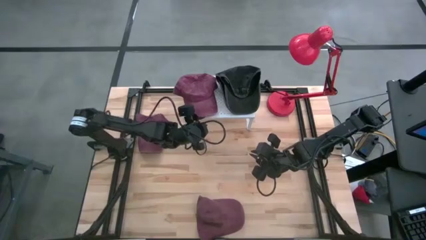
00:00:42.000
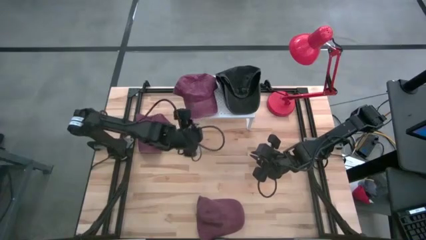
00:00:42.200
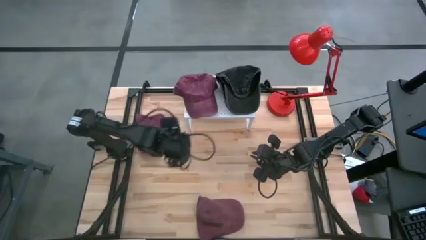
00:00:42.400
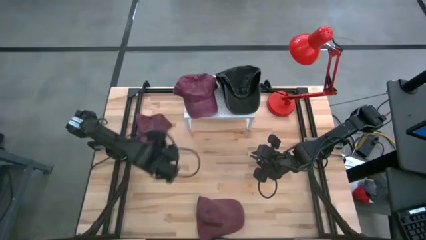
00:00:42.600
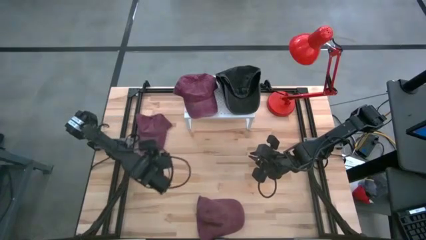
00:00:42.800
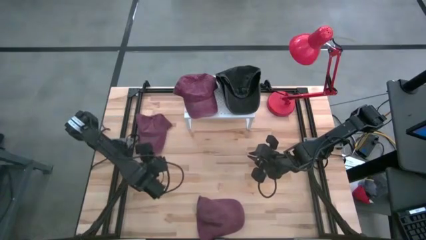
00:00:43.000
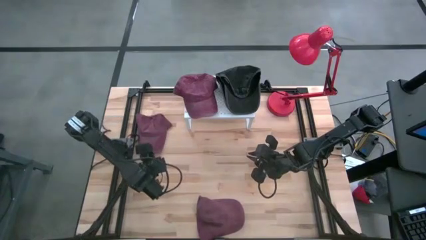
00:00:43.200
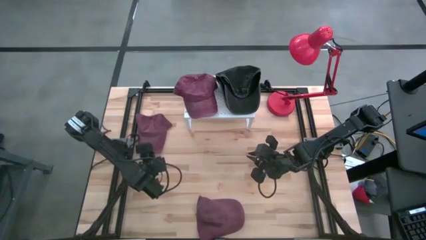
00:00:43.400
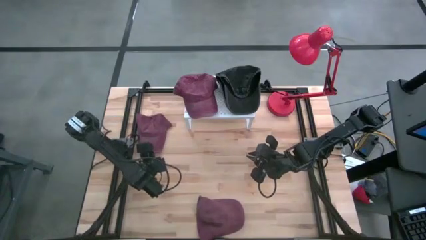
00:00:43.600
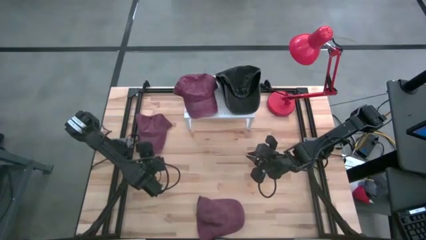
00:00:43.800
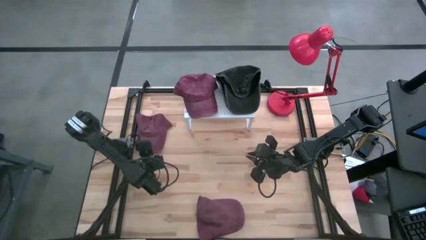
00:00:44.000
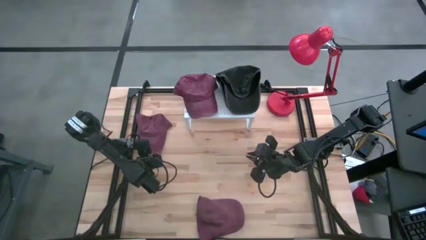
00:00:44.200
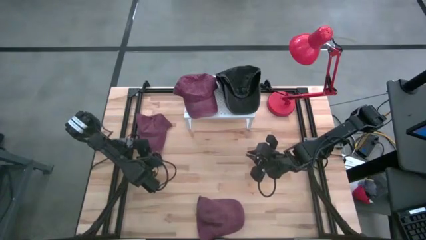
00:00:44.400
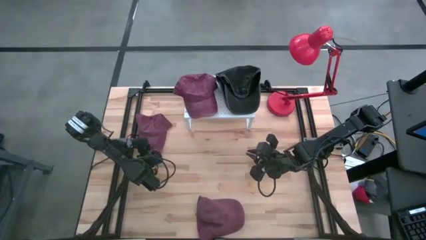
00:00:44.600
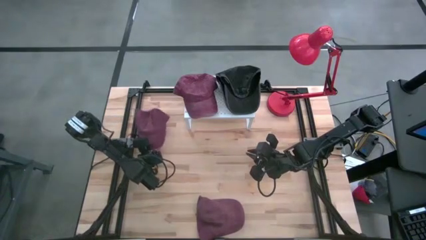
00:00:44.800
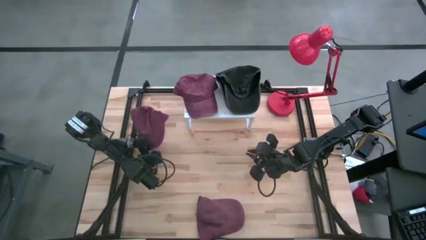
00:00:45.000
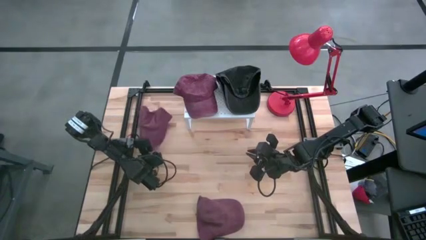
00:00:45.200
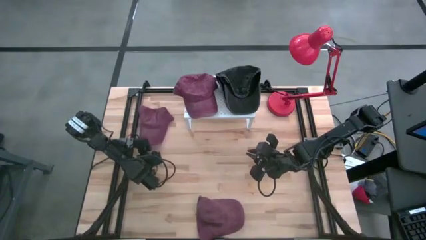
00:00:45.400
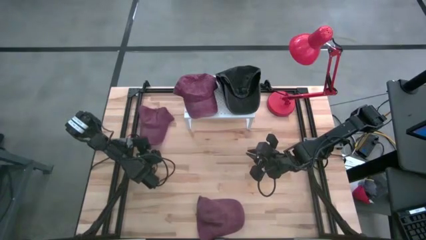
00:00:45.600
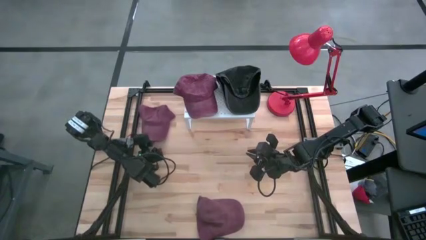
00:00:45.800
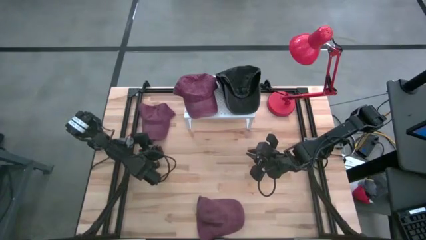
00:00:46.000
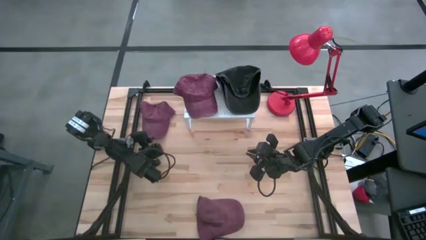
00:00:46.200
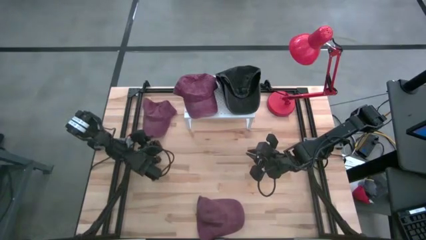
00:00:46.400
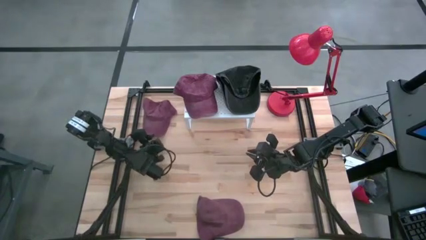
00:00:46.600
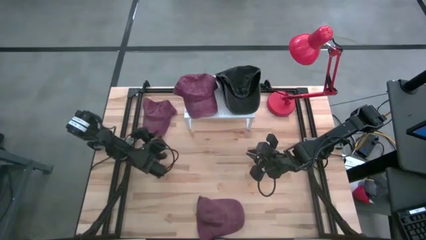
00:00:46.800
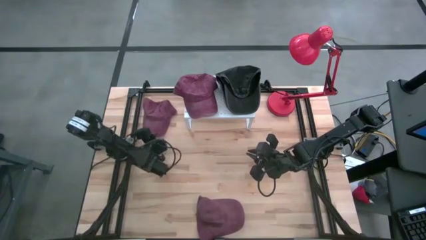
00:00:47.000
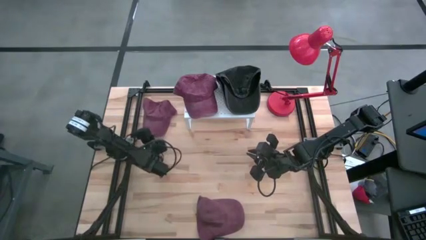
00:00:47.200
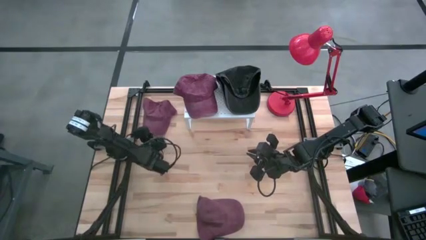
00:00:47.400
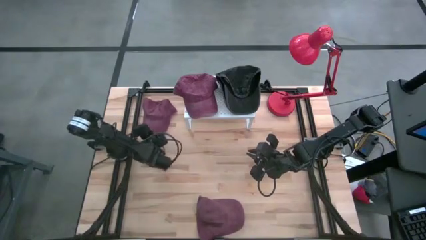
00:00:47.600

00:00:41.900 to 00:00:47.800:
Task: Pick & Place hat
Stack the top red cap on the red cap on the shelf

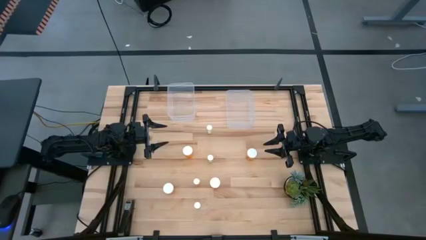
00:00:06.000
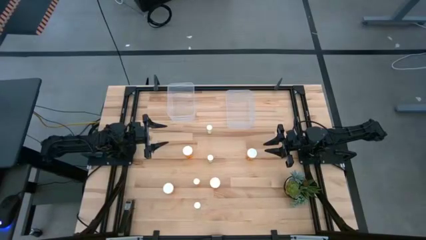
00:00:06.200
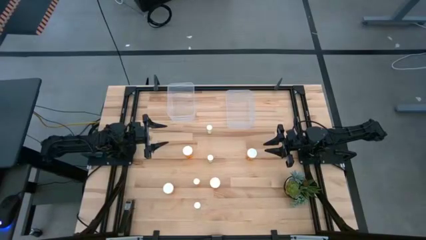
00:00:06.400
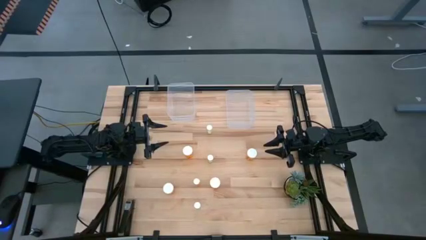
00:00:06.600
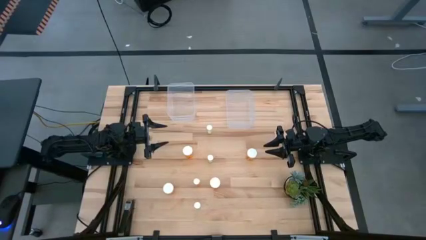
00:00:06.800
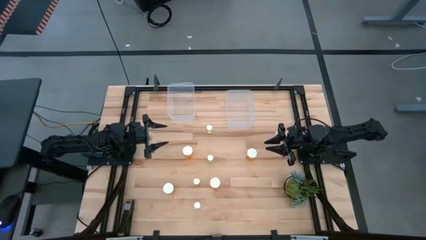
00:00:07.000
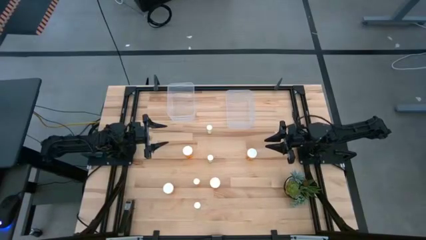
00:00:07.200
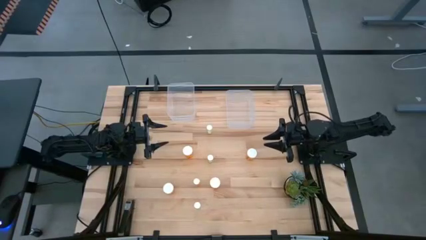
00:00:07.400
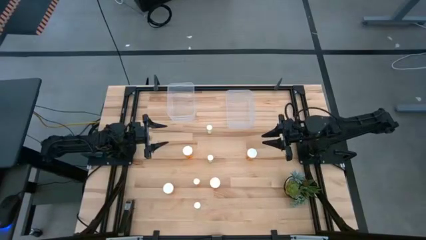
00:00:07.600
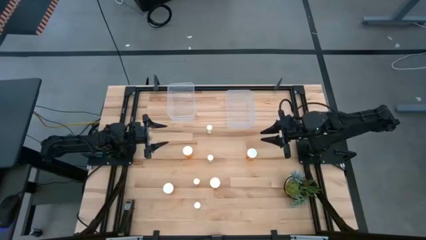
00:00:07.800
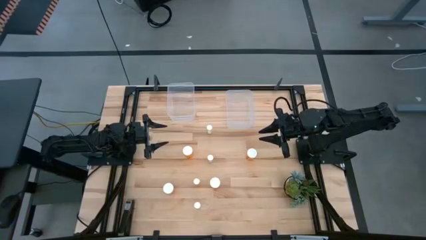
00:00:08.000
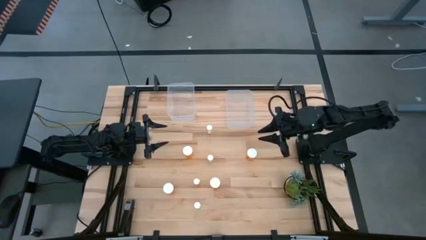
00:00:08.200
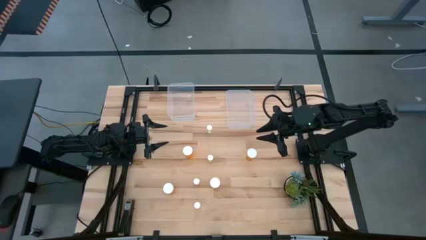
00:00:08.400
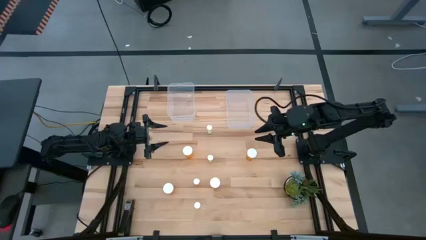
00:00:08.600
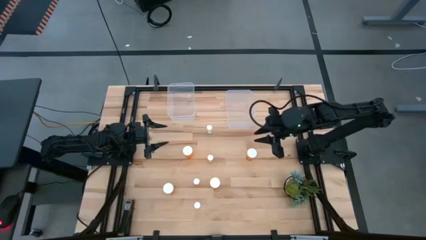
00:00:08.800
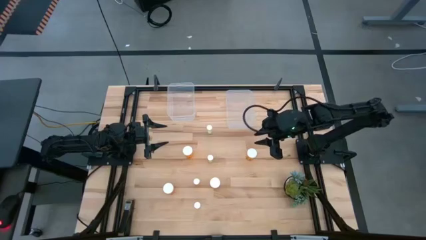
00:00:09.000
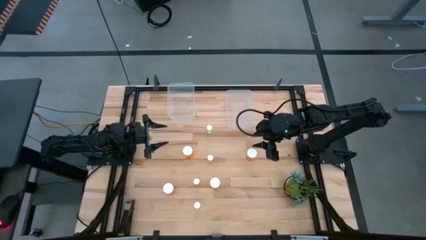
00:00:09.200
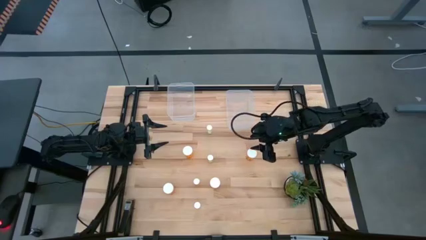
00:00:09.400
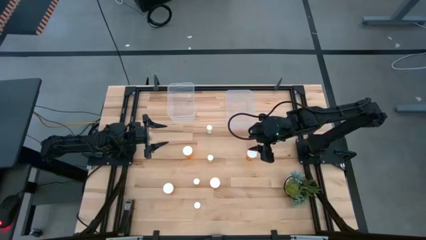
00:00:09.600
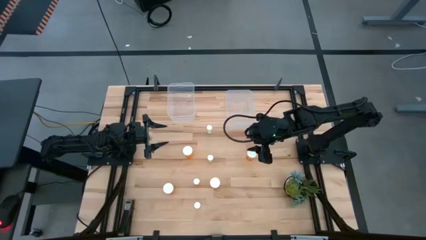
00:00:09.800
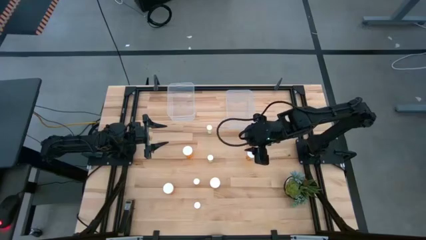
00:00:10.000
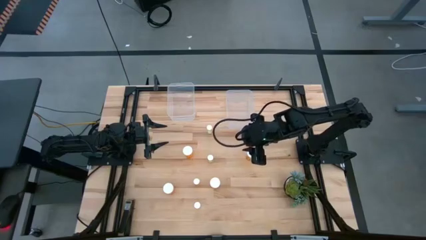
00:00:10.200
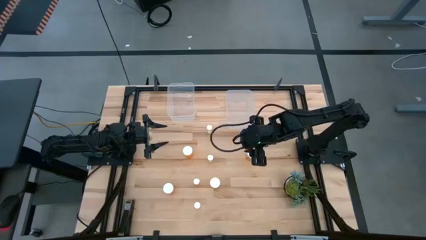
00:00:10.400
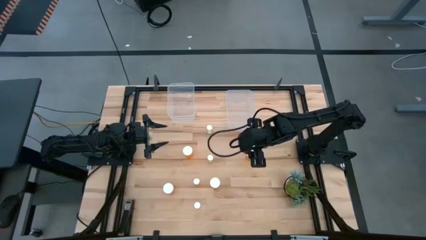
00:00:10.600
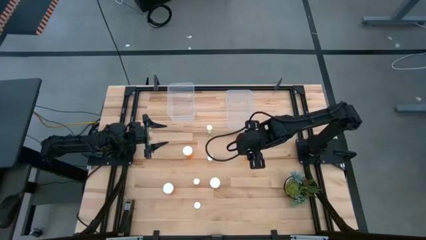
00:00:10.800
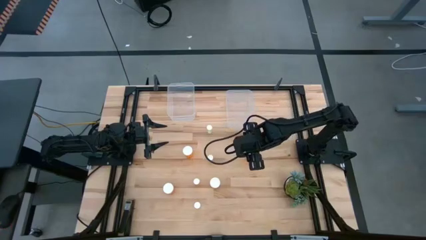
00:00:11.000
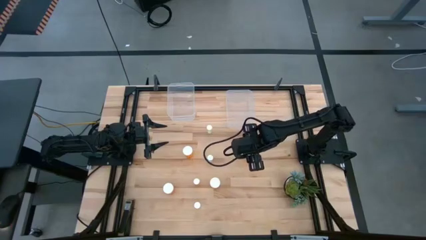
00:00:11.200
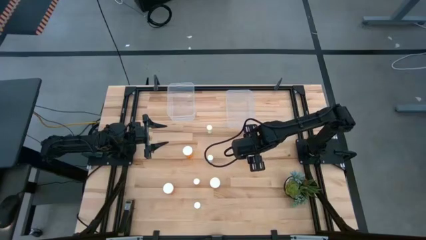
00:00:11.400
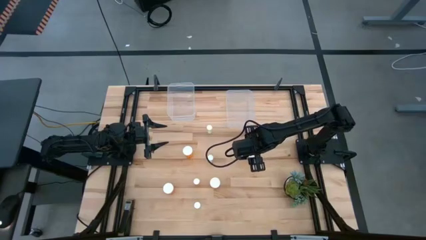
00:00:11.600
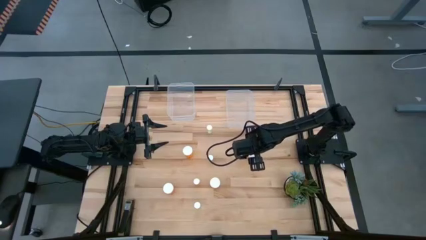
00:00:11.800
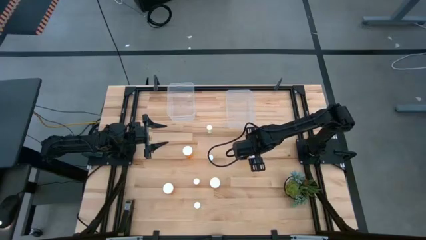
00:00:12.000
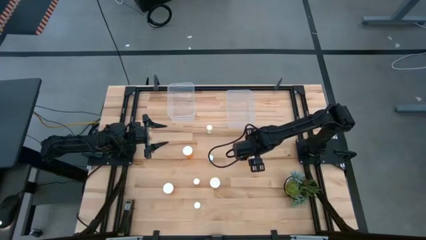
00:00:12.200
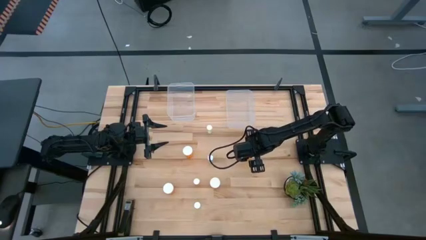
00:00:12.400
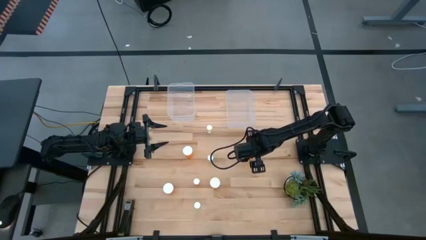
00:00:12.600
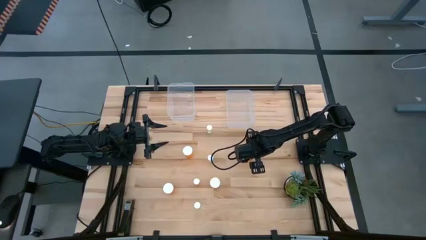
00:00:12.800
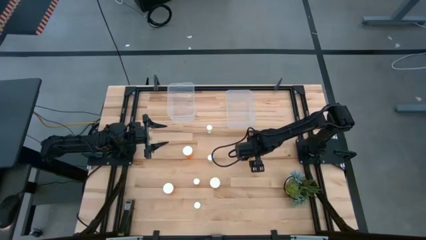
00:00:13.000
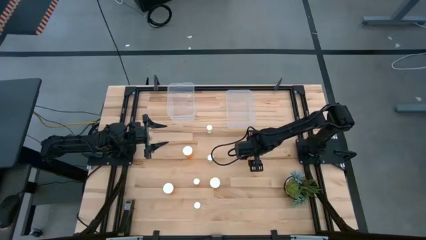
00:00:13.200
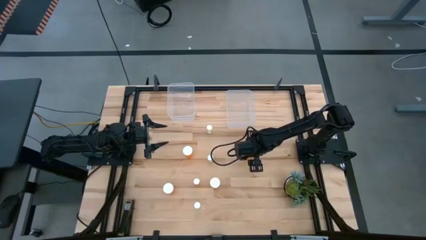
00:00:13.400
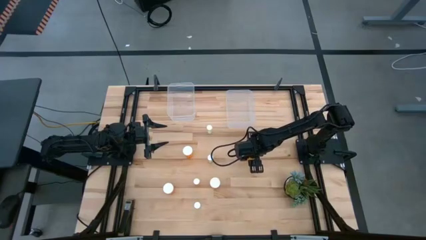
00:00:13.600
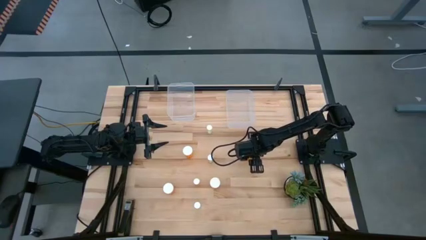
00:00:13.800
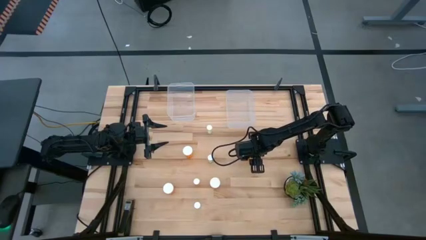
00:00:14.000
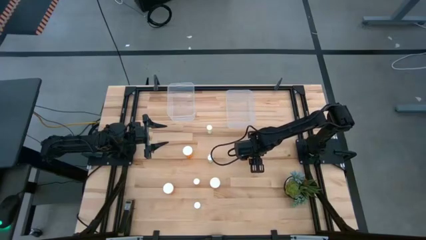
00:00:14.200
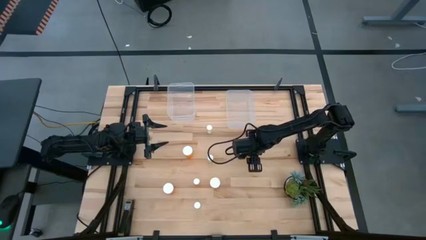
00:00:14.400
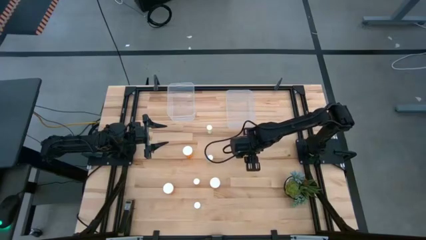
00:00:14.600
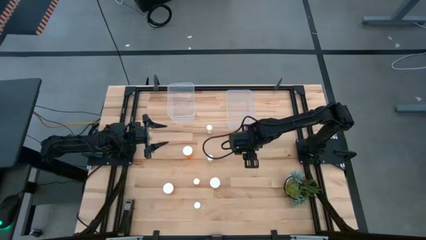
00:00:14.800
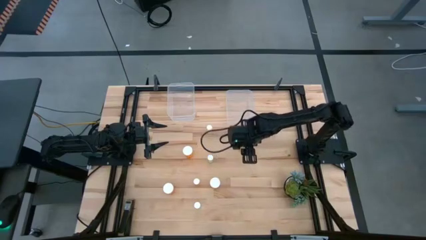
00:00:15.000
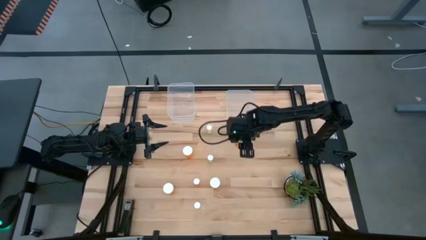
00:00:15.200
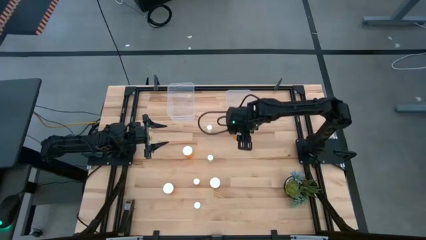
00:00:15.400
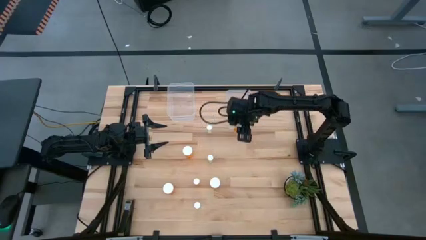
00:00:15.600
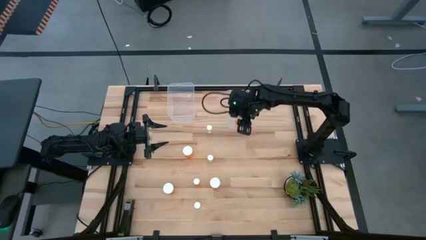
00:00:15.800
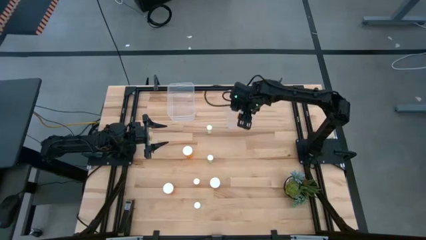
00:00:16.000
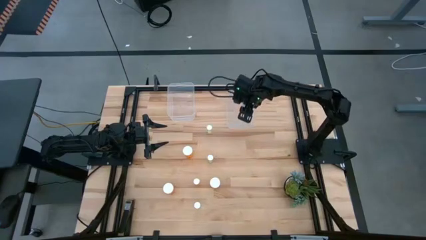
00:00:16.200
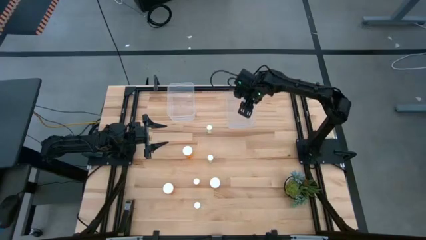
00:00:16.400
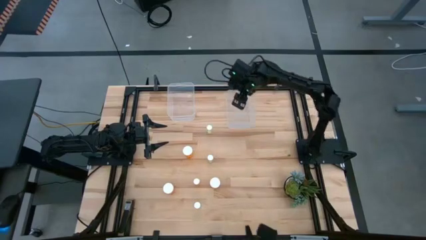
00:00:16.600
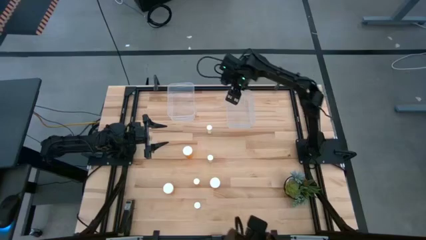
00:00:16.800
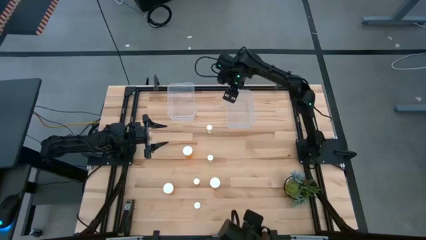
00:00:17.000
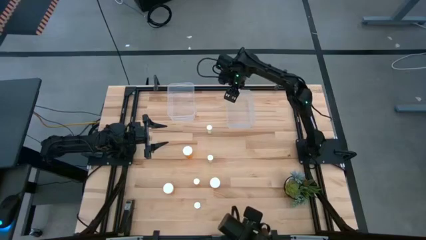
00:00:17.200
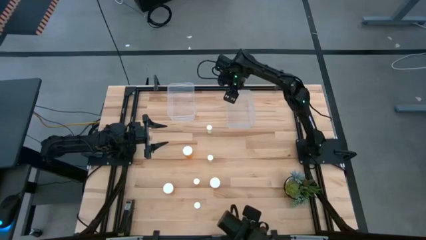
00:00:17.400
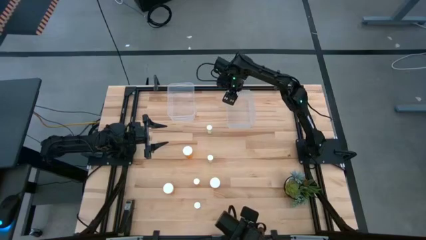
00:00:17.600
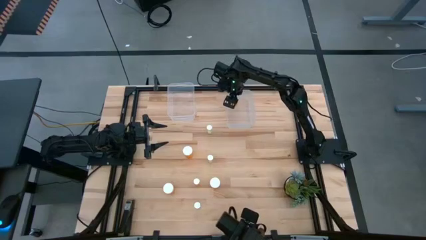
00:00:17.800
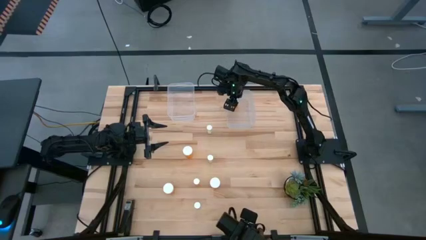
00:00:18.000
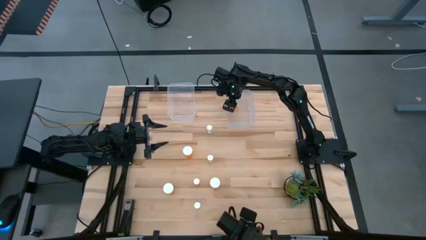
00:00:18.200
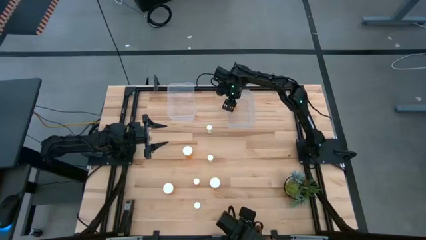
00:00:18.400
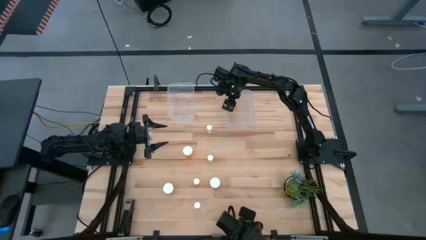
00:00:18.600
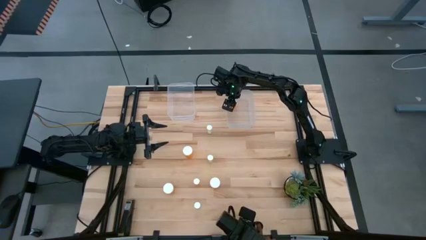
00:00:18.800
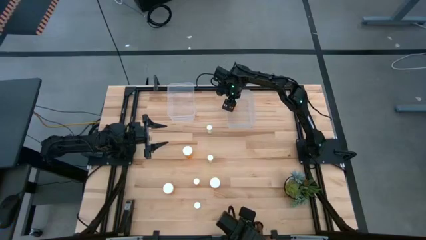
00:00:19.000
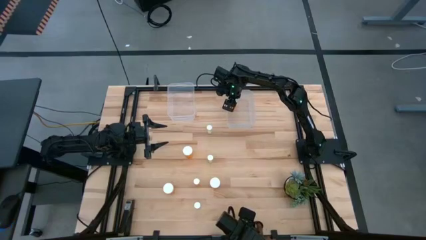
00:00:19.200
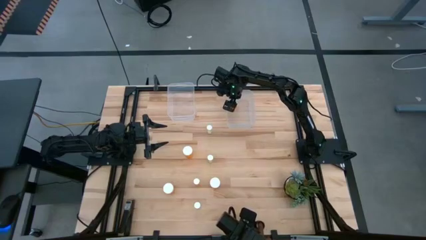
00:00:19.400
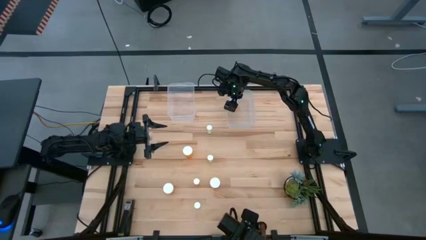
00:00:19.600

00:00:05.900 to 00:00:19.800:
Task: Pick and place medicine bottles into bin by pill shape (circle, oval)
Put the large orange pill bottle into the right transparent bin
